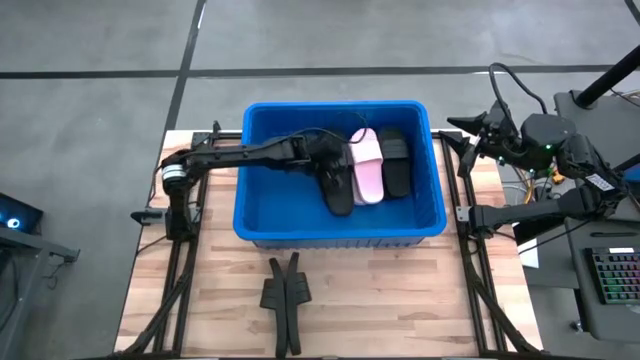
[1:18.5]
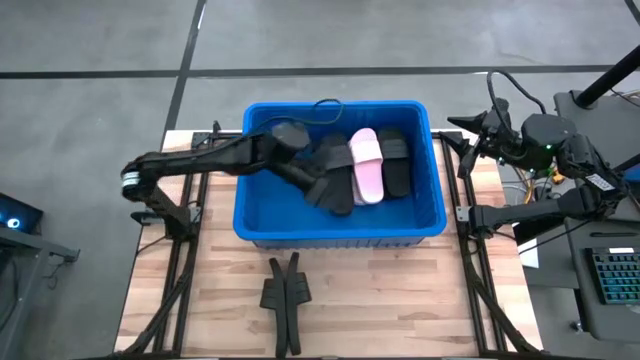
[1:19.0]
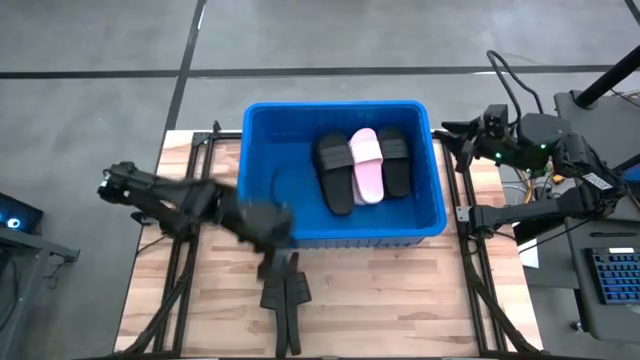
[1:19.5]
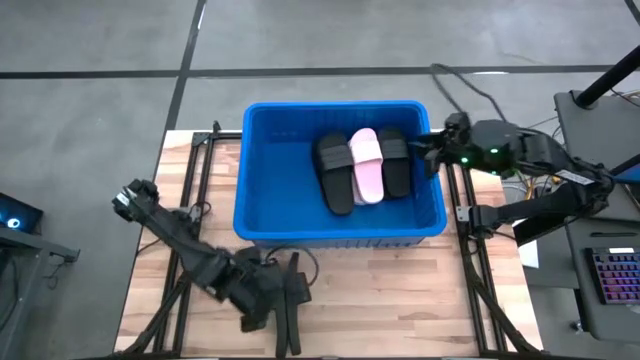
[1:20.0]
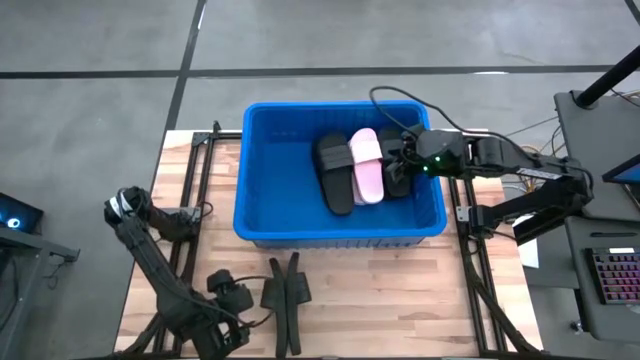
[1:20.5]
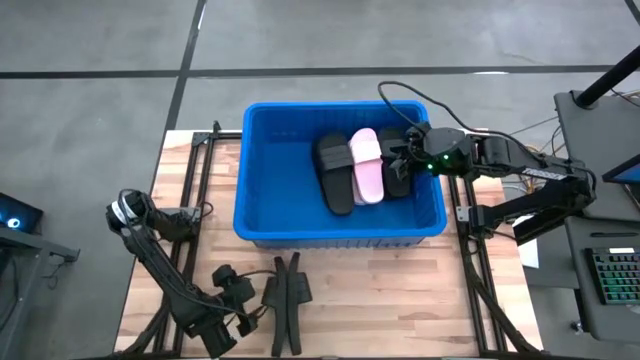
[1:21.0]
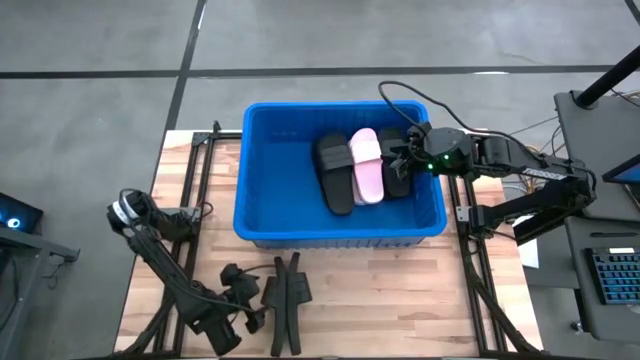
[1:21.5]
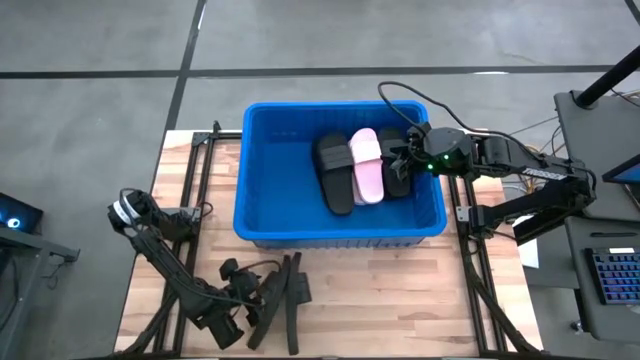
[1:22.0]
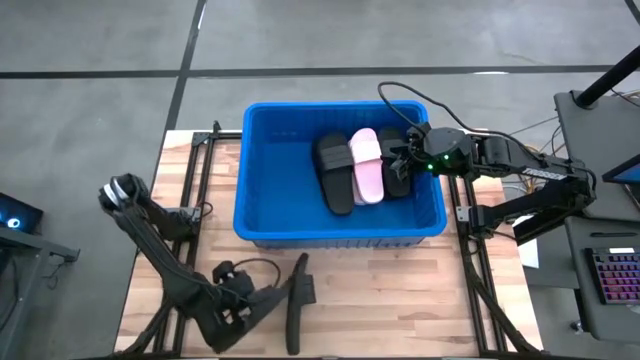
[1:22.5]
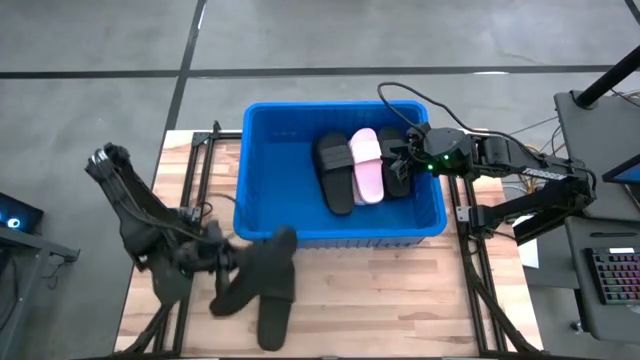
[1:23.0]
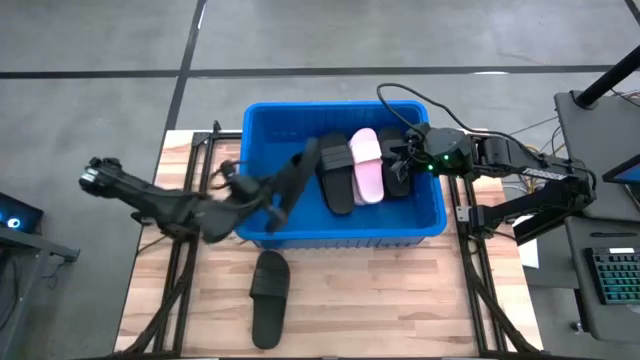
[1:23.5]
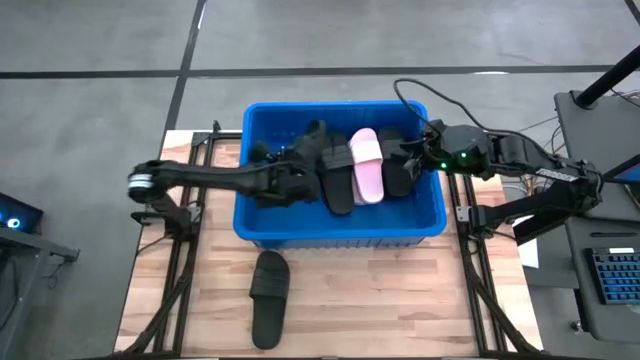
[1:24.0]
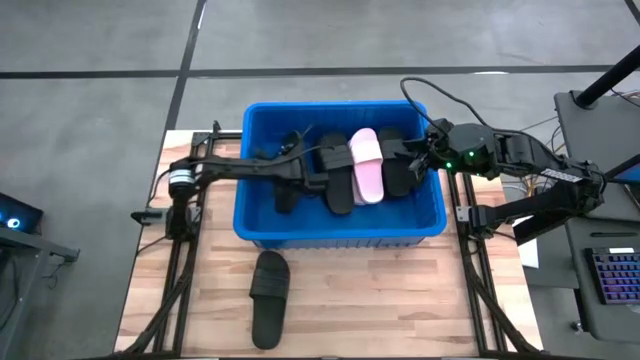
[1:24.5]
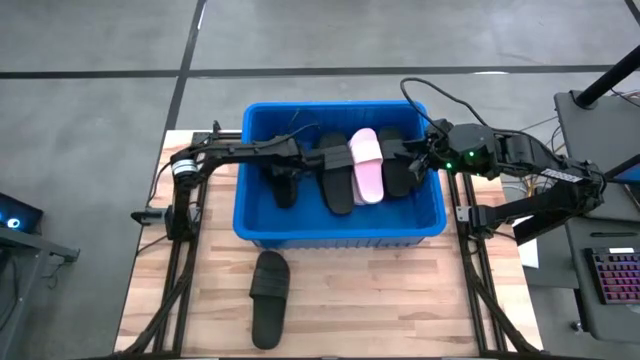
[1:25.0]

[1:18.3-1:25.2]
Task: Pick and place slides into bin
Put the black slide into the blue bin

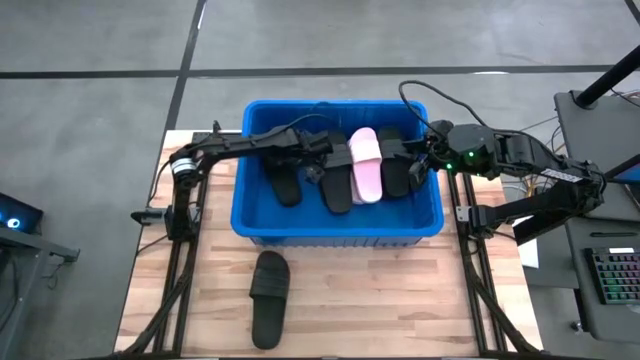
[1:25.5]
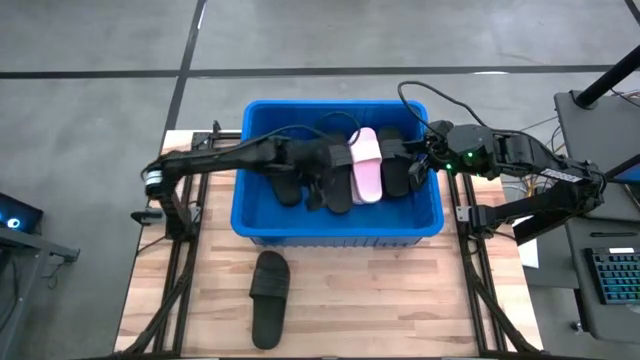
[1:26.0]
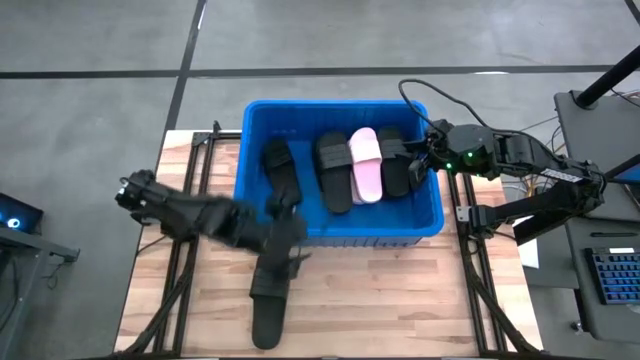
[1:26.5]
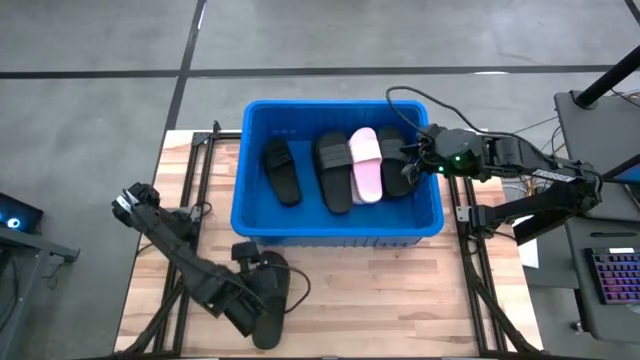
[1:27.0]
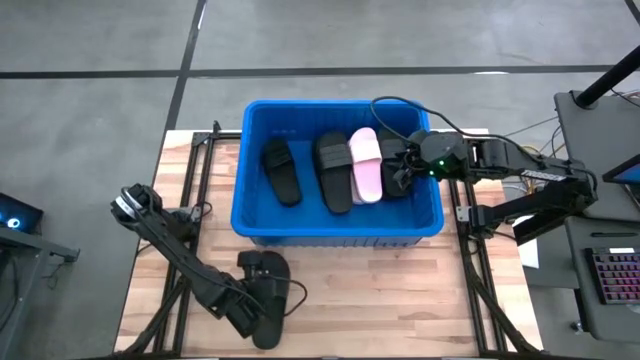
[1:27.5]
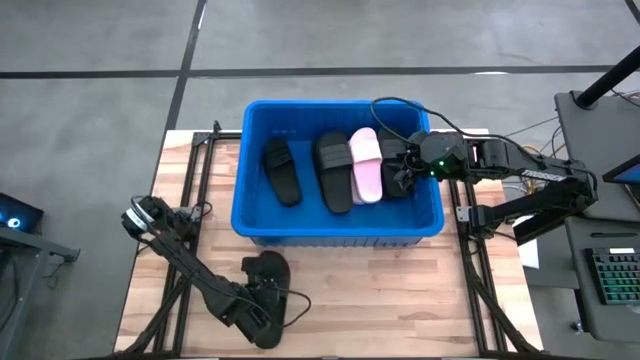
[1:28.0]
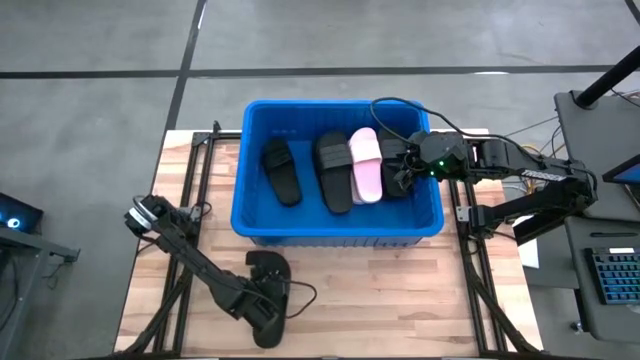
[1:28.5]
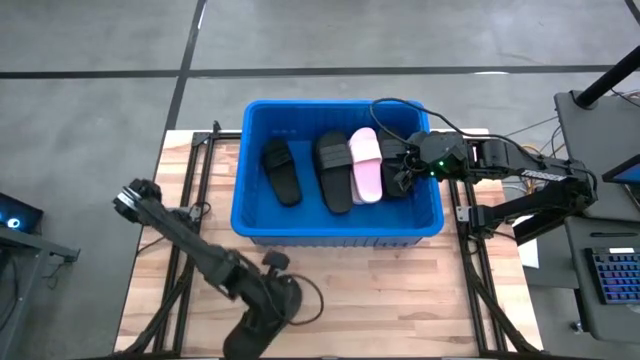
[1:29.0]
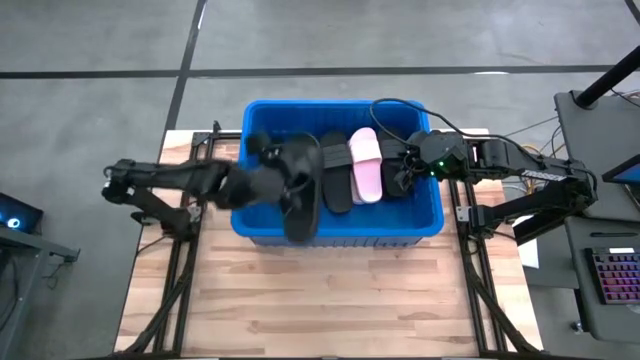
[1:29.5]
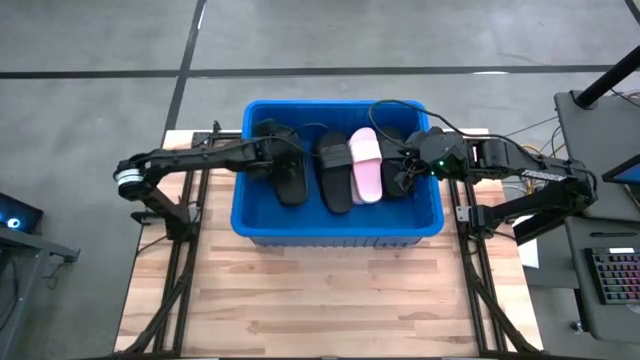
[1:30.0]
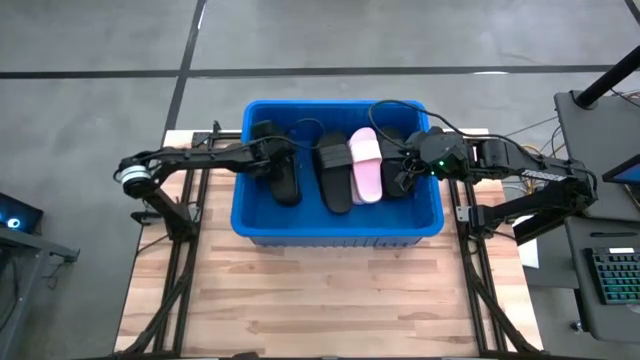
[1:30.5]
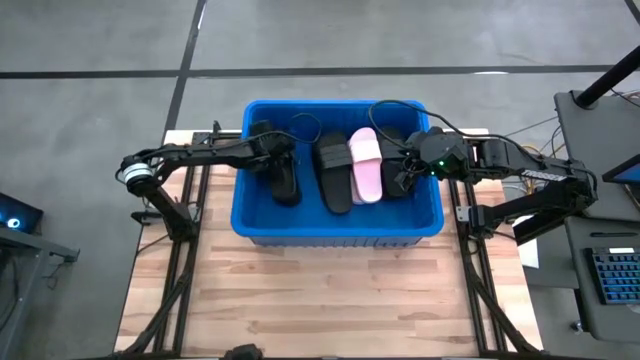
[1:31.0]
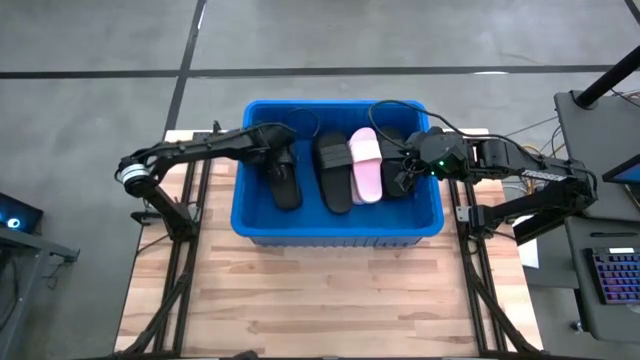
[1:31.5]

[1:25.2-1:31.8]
Put the black slide into the blue bin

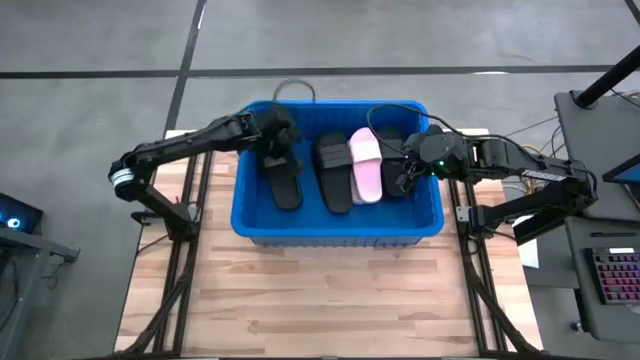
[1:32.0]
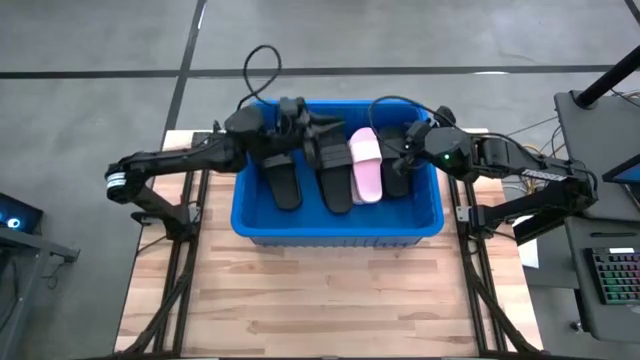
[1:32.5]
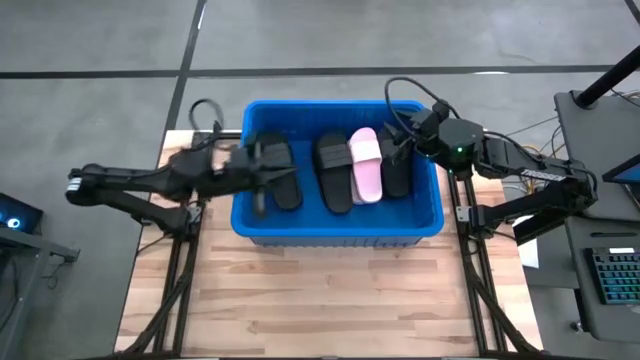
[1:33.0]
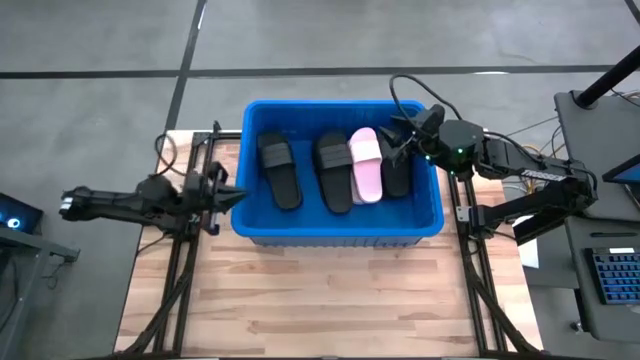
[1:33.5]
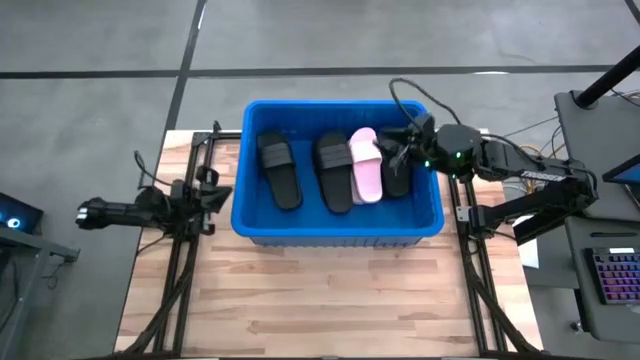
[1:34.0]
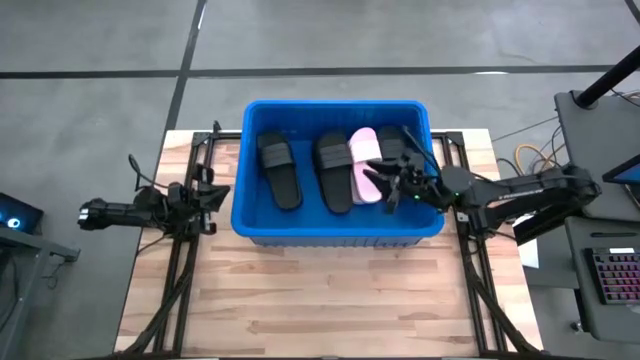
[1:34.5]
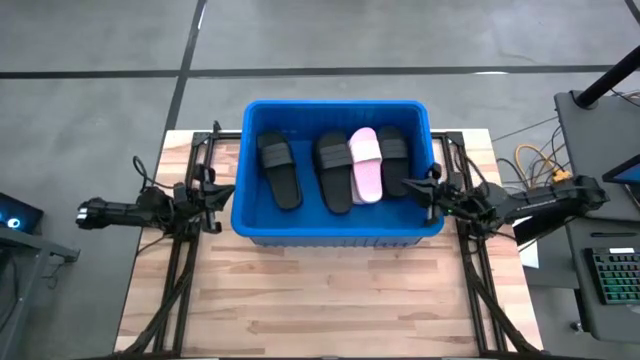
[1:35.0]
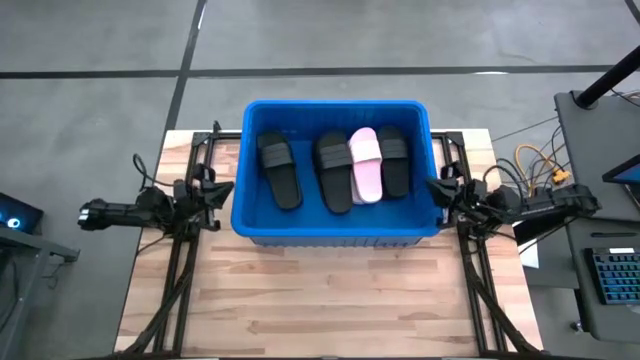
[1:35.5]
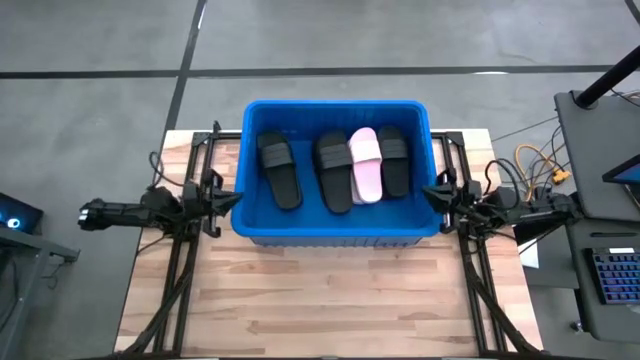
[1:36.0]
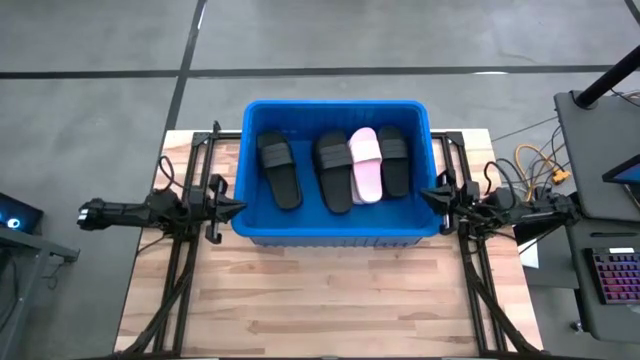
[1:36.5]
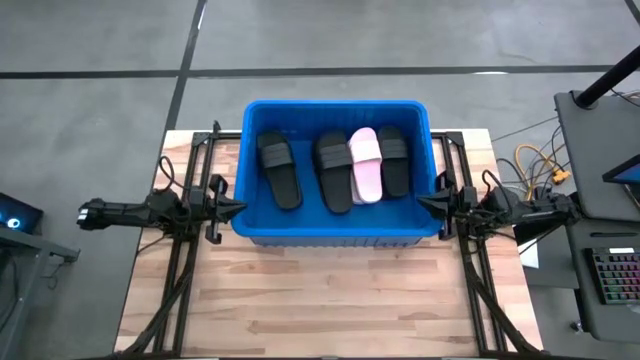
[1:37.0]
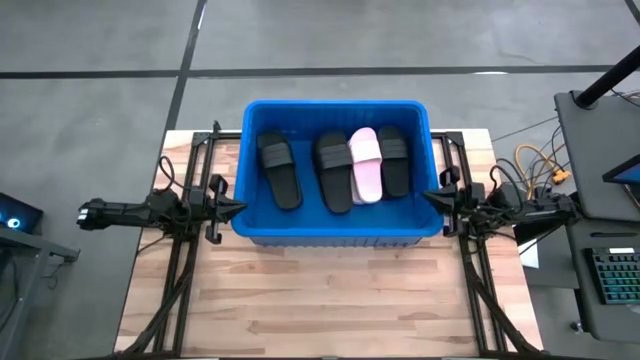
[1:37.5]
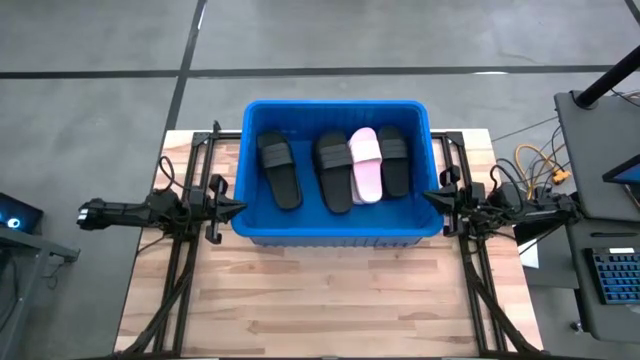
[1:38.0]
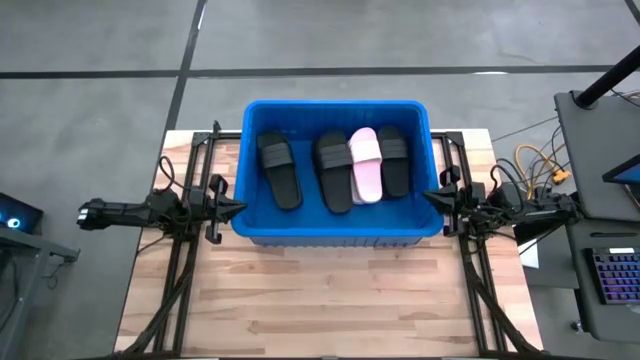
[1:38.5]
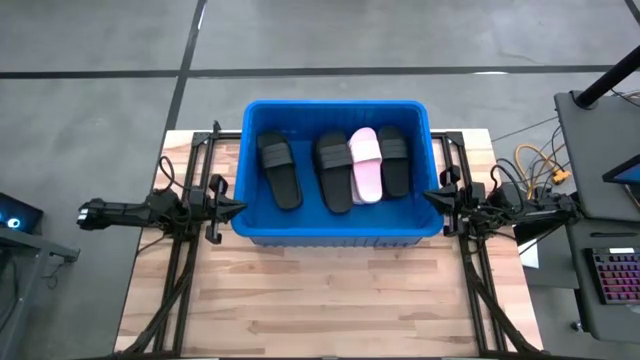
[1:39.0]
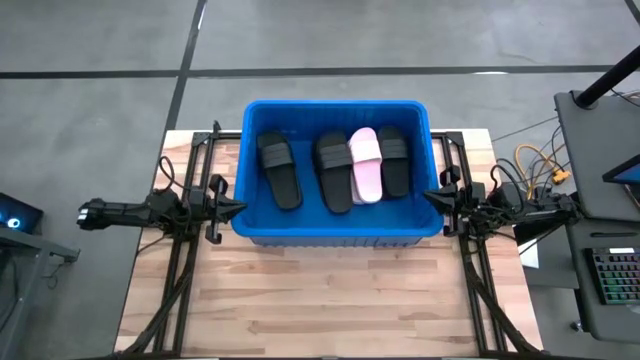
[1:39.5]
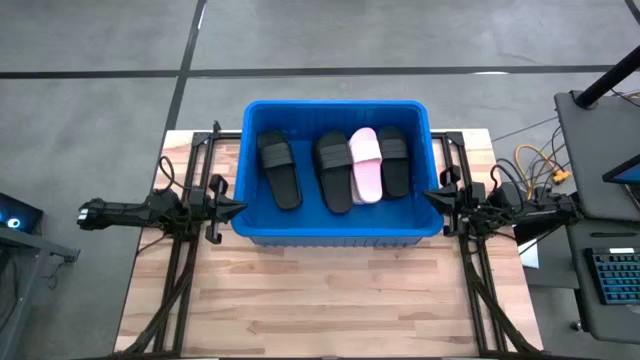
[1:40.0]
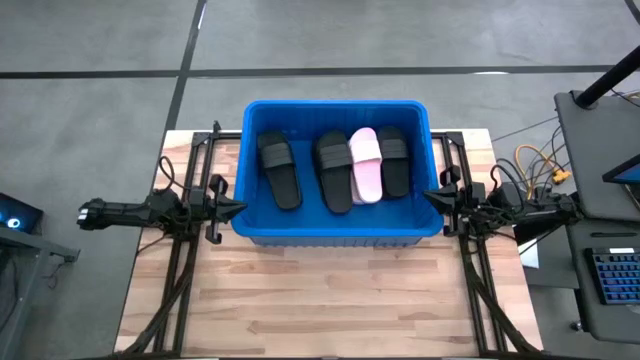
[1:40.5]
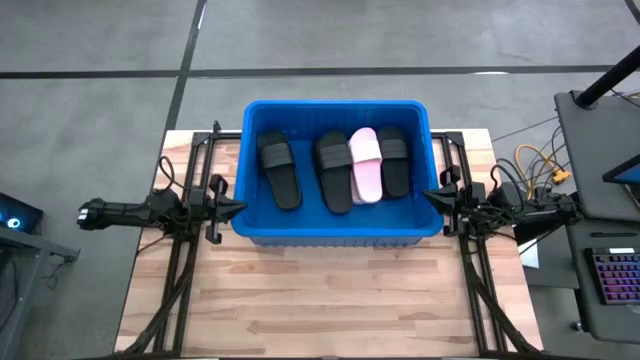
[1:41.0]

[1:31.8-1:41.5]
Return to Home Position
